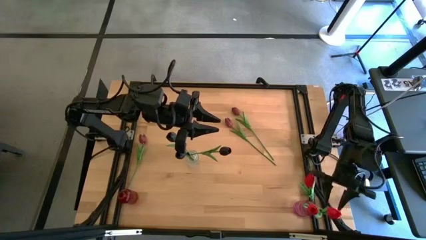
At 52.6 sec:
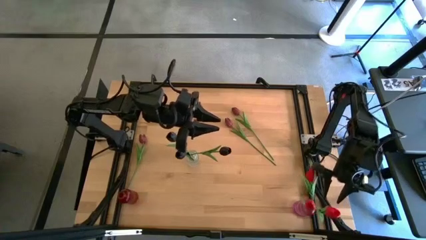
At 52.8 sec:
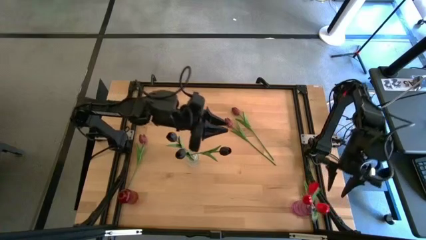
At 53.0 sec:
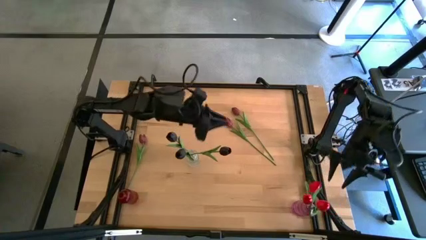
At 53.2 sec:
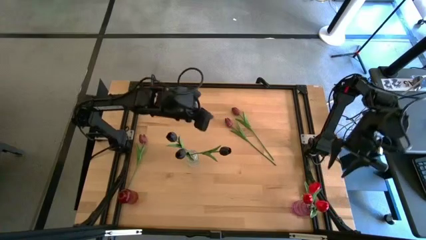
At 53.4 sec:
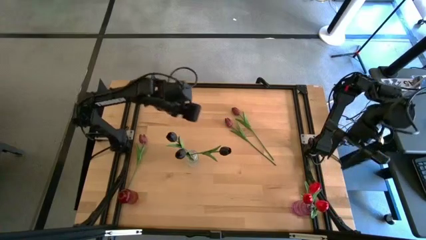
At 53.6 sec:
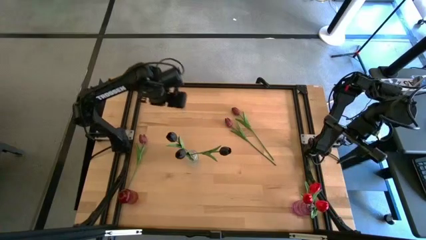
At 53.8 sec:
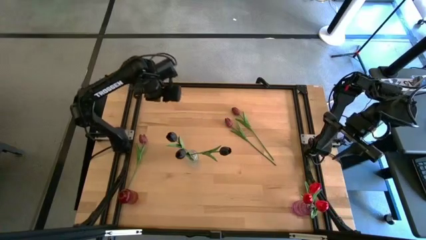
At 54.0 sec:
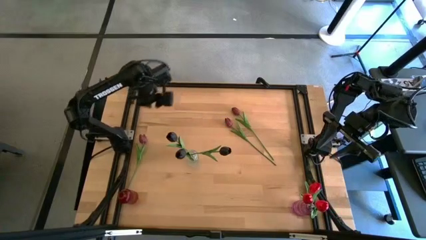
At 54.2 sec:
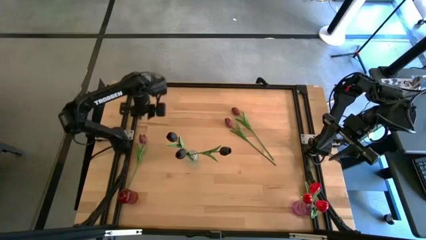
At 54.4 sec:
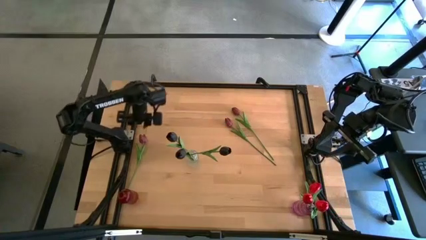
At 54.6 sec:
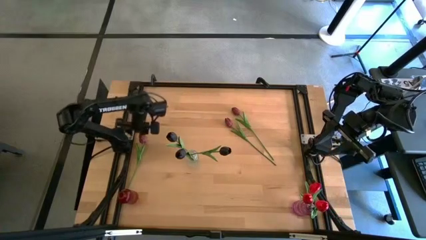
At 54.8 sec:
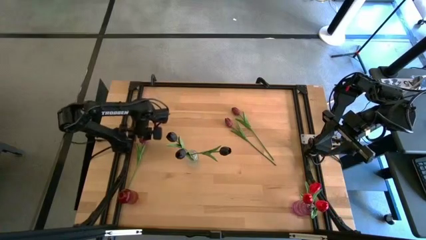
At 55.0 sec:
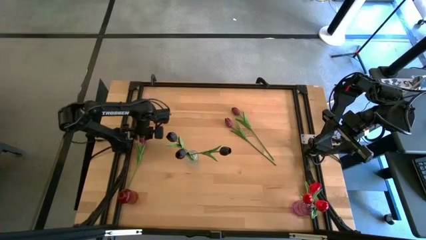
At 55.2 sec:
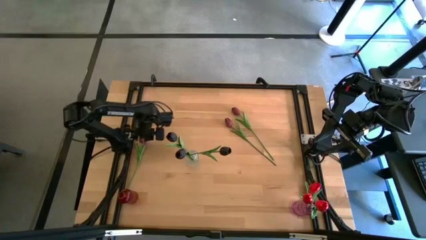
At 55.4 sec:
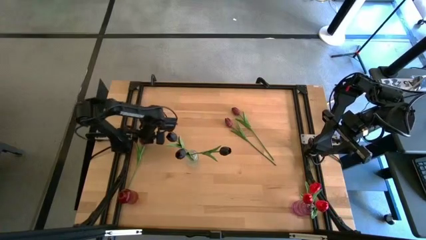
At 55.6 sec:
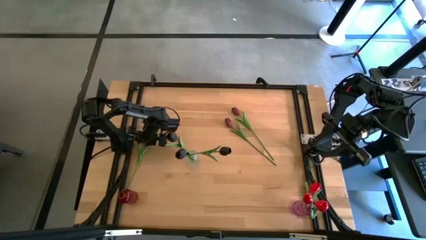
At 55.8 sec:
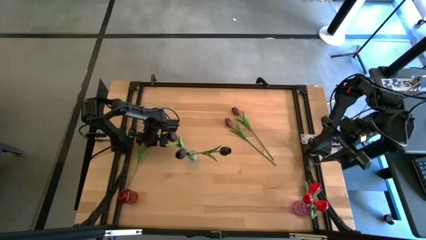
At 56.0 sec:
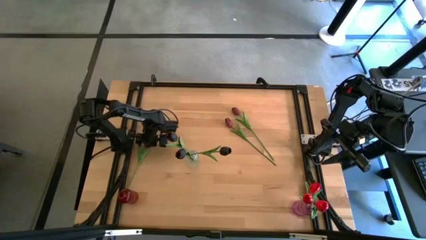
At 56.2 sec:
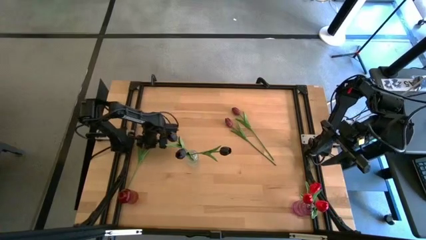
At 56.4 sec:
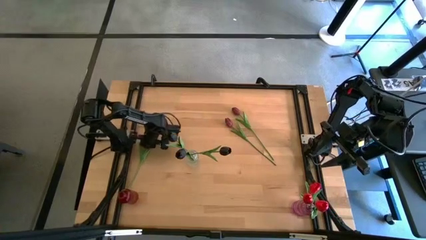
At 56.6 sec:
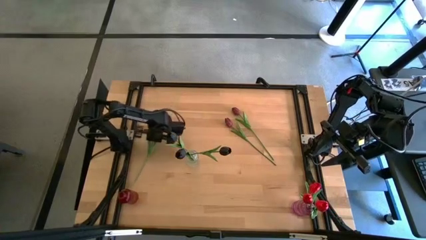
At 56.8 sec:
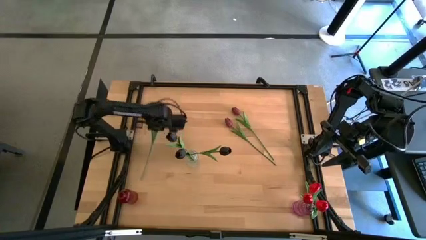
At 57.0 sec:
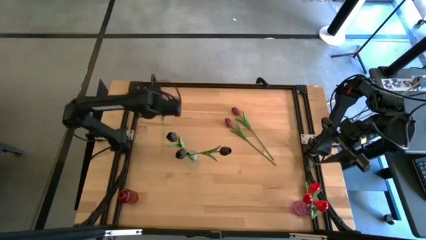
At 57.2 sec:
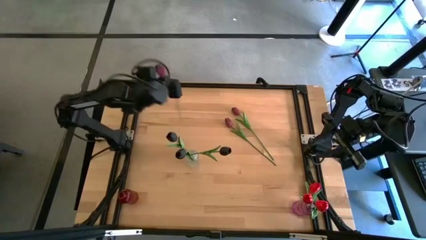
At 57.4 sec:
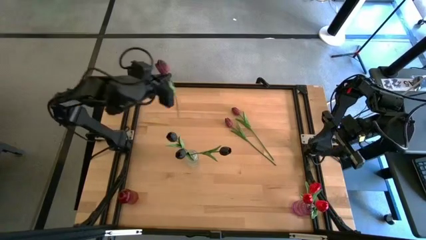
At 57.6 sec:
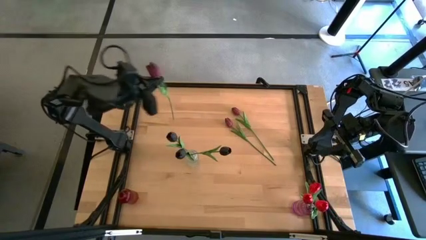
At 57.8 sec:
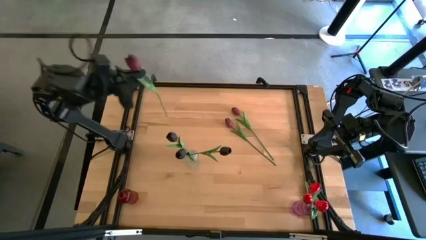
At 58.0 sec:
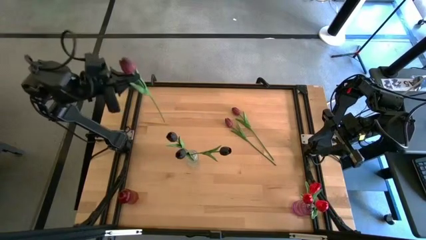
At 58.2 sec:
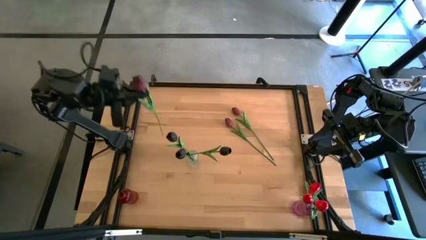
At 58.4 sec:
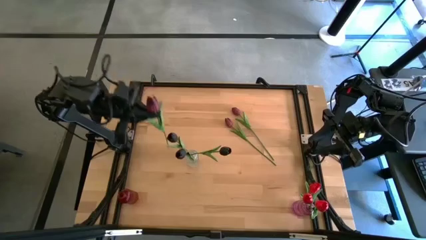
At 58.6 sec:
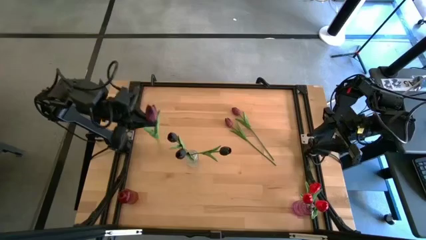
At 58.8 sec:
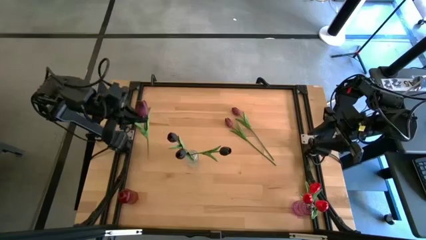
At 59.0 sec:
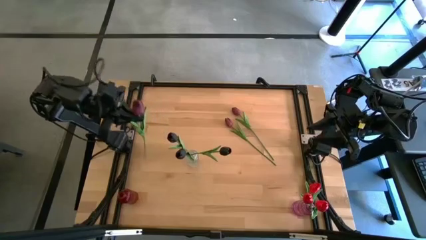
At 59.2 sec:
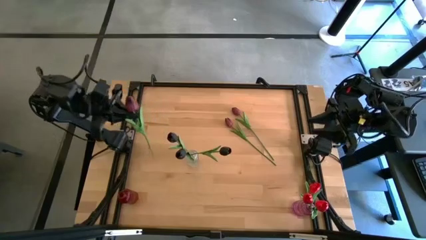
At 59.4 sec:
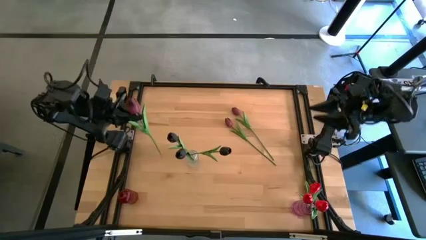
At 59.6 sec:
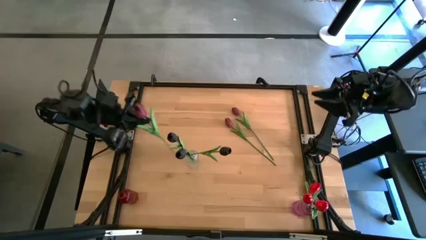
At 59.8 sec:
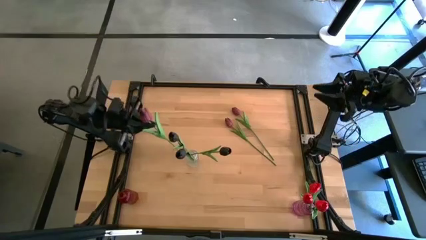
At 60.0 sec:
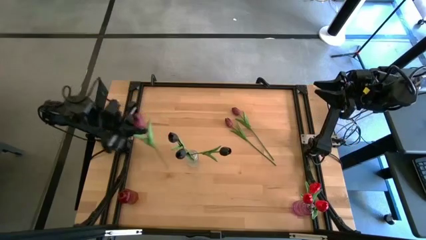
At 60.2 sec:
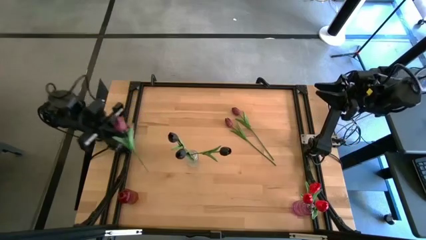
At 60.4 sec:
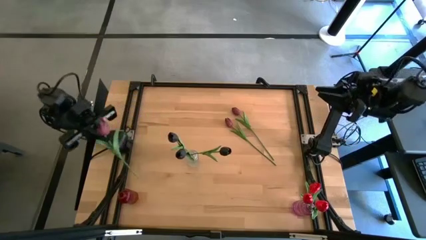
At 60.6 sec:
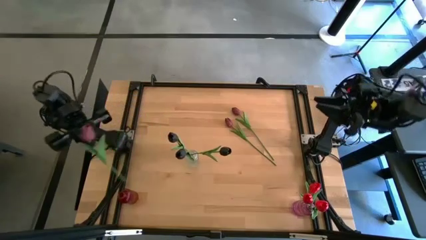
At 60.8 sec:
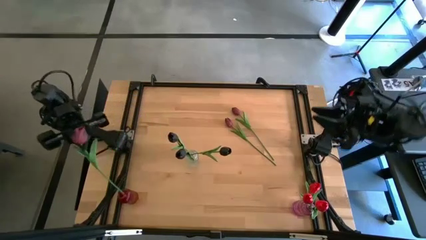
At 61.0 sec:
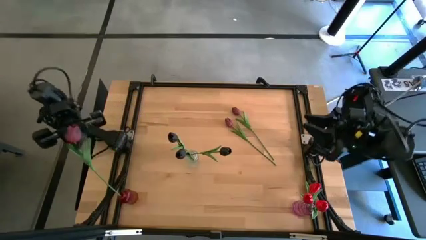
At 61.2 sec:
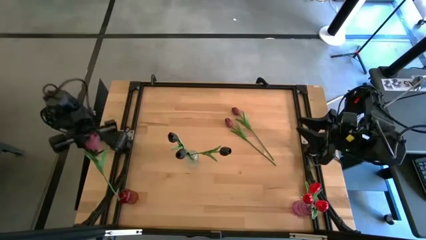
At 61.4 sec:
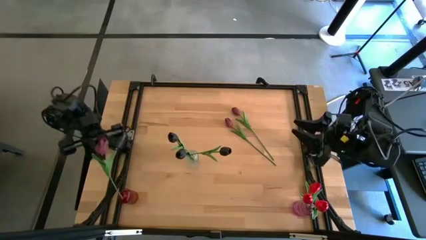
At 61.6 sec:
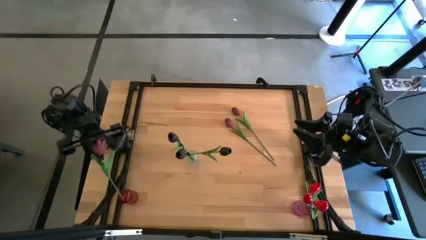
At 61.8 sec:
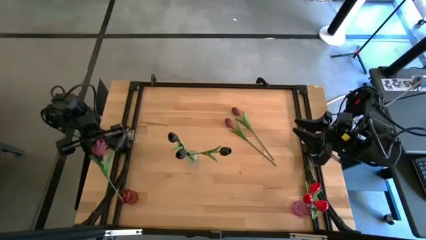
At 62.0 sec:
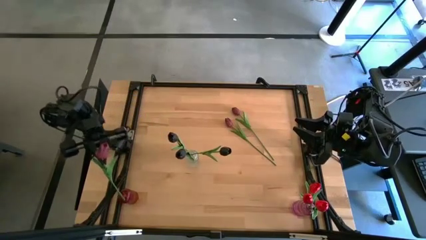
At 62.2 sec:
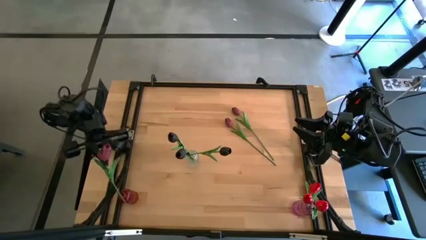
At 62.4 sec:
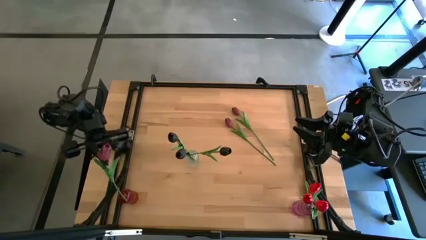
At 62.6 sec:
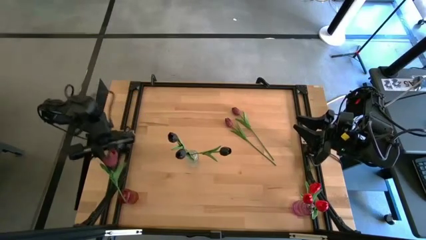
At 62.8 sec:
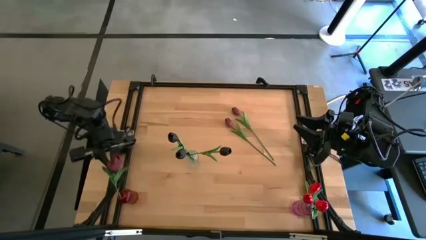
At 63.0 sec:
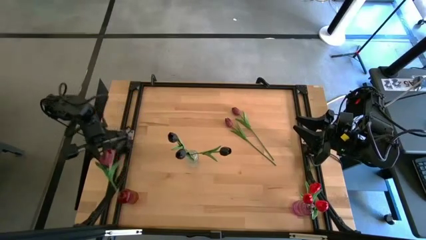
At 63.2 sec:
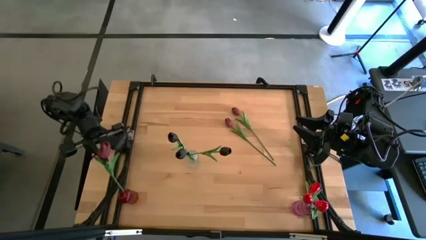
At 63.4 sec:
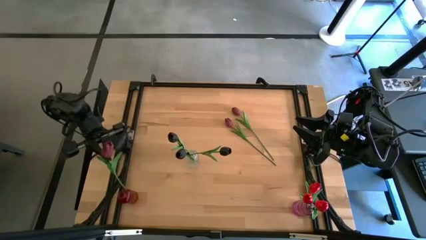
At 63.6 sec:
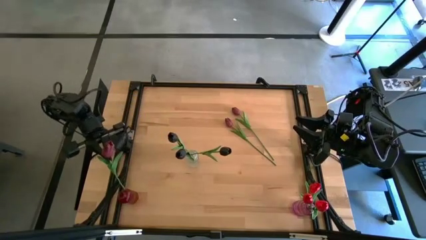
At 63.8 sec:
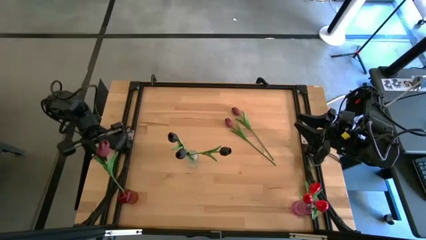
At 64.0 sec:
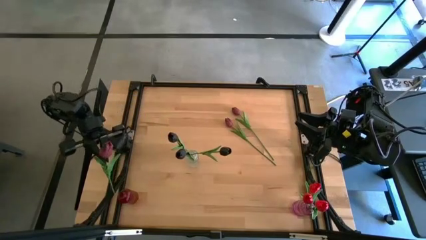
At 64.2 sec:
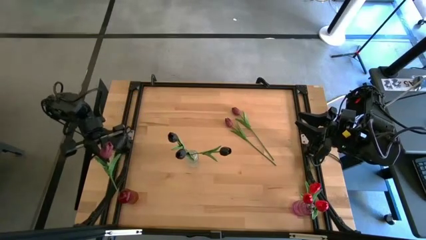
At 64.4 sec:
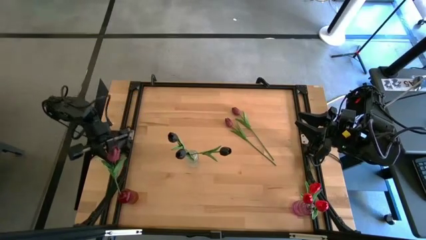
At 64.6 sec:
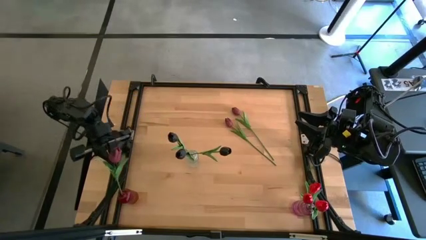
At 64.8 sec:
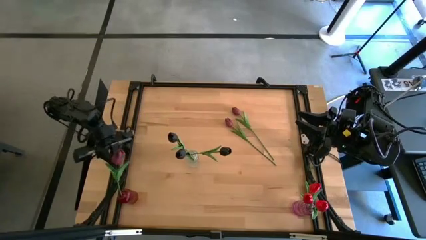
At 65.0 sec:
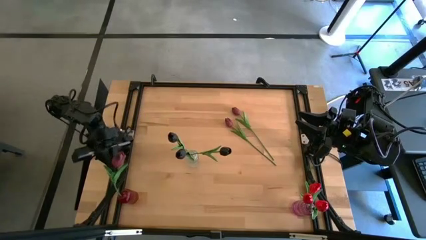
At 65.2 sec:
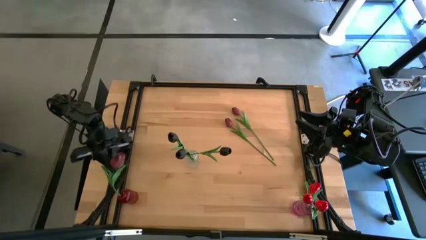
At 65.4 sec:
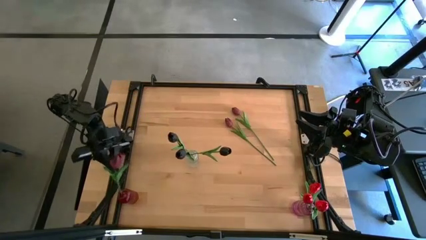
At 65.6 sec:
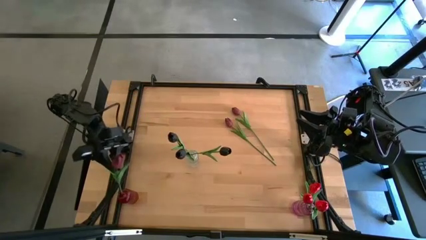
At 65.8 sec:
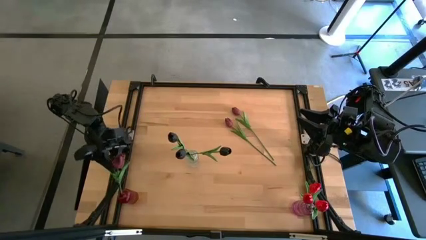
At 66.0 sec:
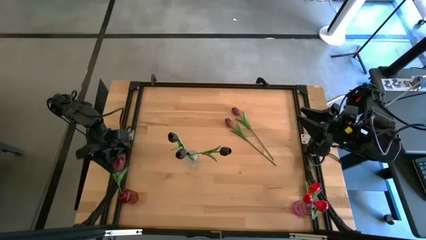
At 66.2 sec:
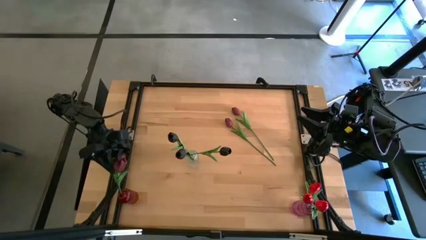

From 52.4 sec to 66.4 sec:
Task: Sort flowers into vase by color
Put the pink flower into the red transparent vase
